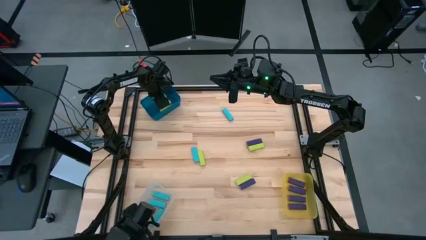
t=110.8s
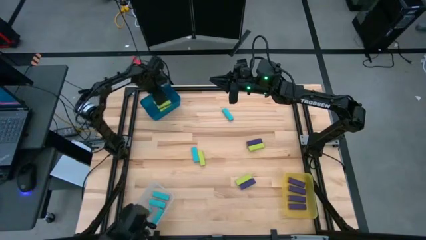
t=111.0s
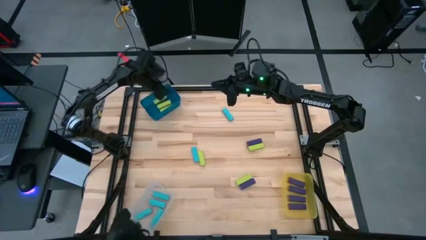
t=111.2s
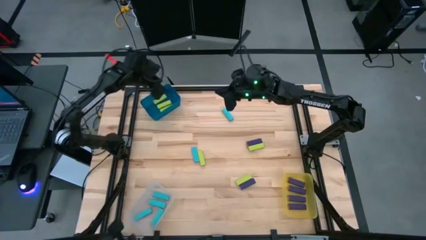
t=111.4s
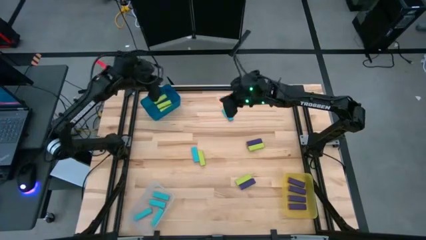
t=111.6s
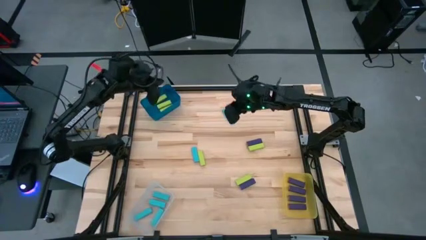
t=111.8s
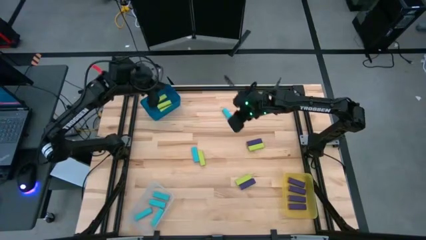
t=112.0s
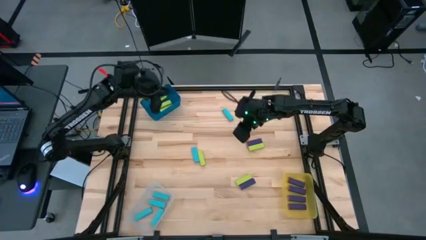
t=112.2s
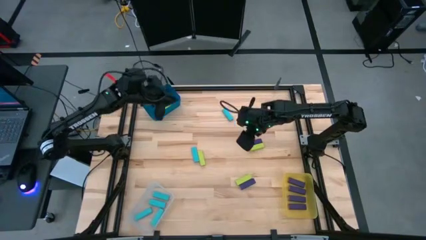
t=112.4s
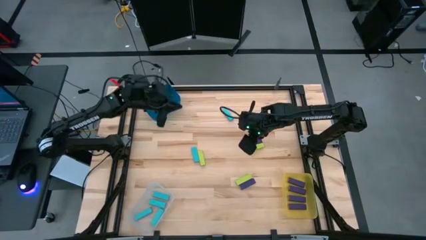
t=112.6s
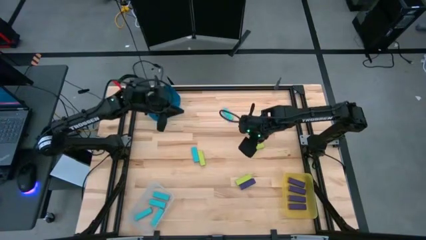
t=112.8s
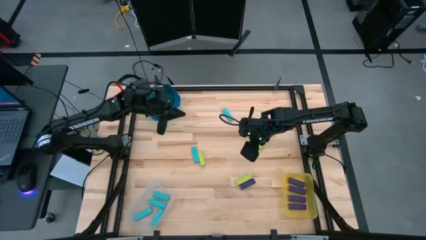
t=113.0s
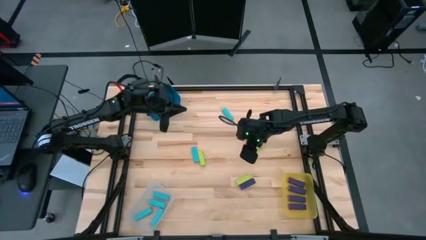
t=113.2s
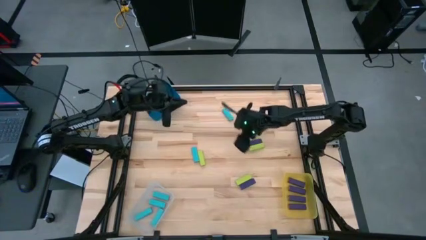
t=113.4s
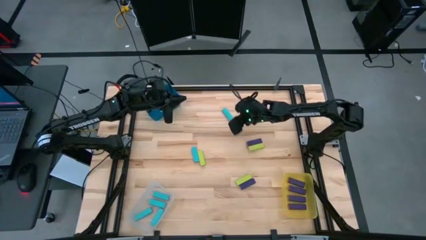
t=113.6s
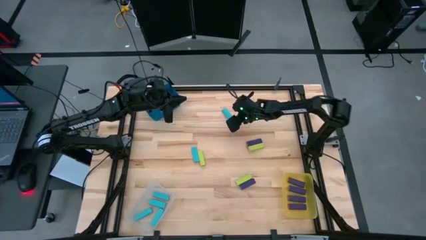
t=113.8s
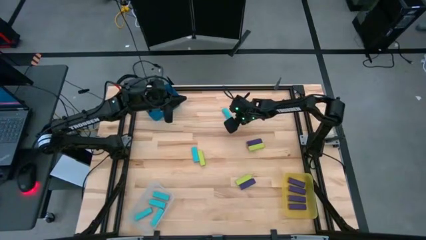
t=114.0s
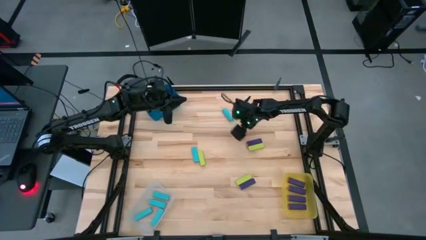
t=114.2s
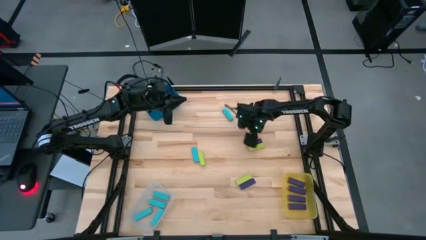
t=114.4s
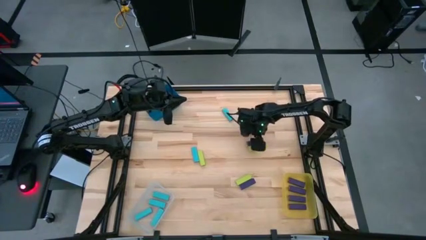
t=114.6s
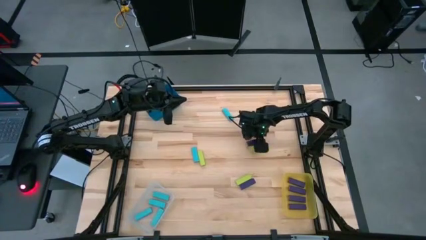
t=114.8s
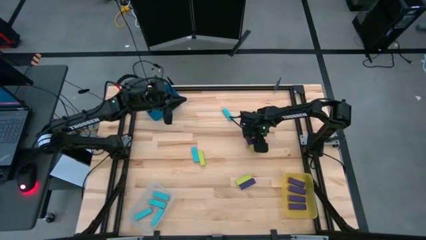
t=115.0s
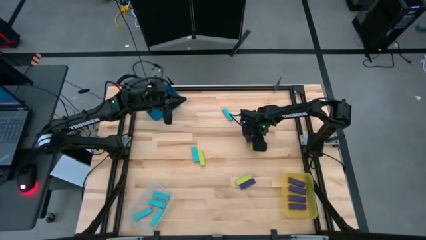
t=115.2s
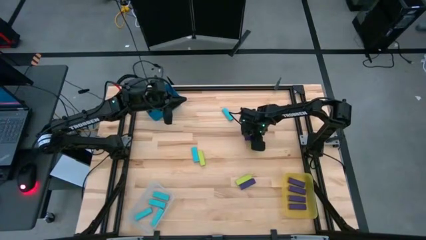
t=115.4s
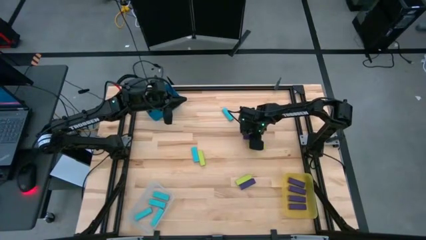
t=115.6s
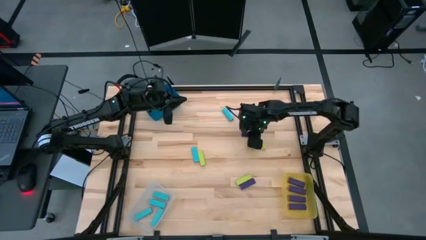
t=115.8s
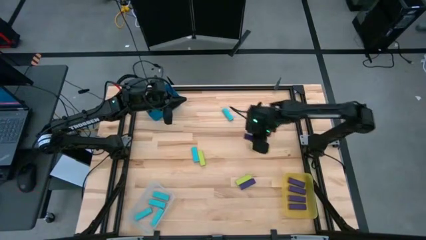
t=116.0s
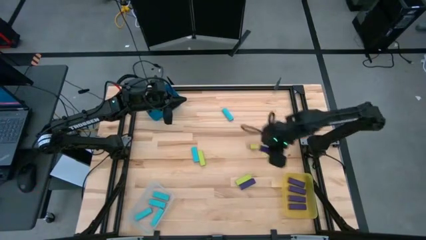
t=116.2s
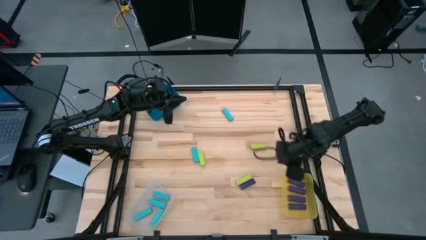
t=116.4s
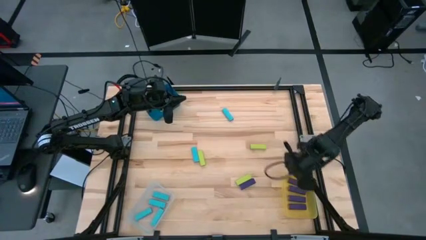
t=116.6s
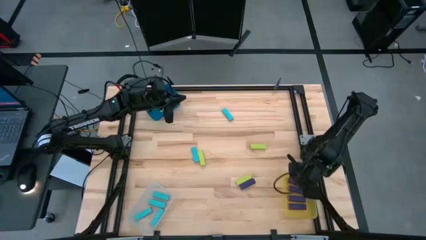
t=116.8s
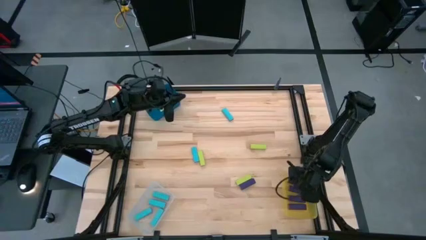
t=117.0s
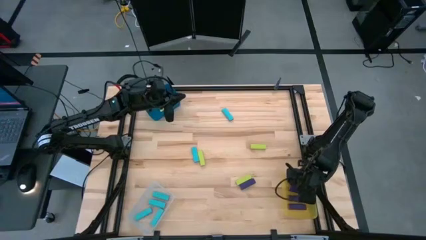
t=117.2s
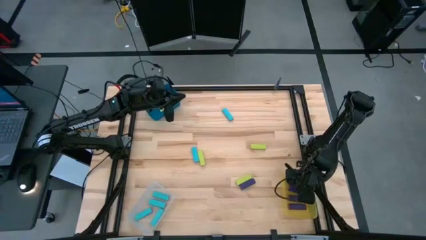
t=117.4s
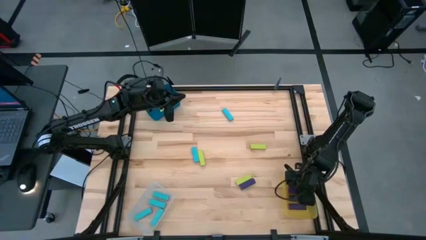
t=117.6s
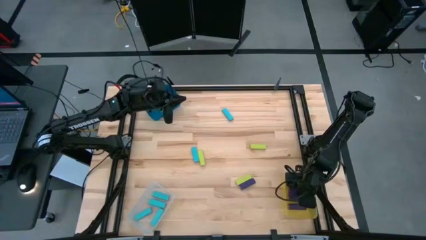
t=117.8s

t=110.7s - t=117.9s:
Task: Sort blocks
Put the violet block into the yellow bin

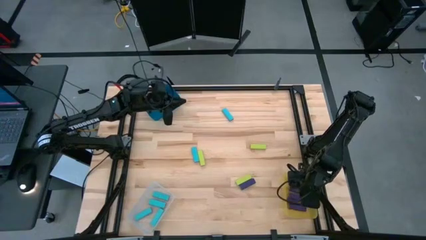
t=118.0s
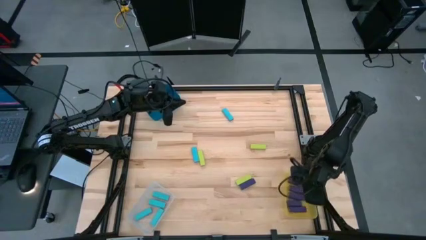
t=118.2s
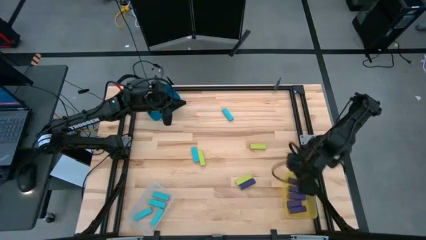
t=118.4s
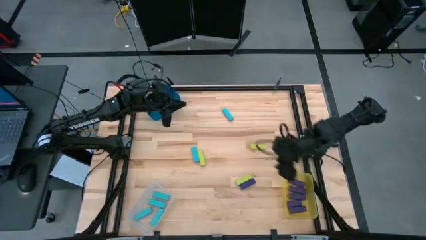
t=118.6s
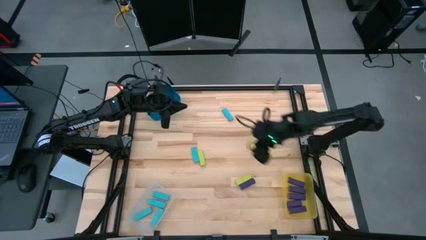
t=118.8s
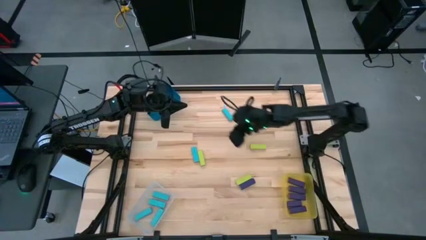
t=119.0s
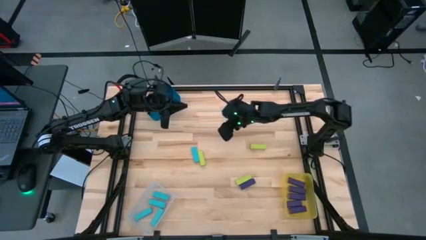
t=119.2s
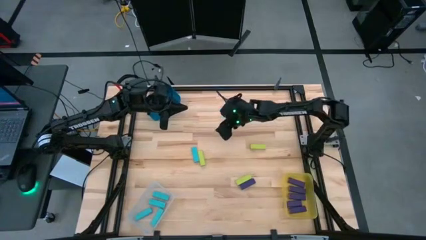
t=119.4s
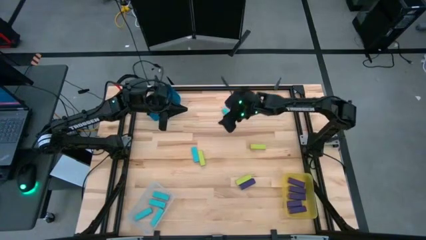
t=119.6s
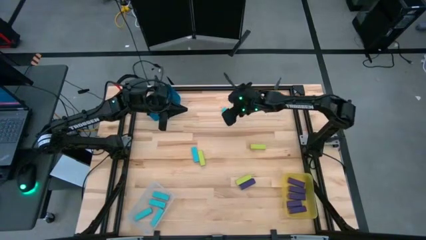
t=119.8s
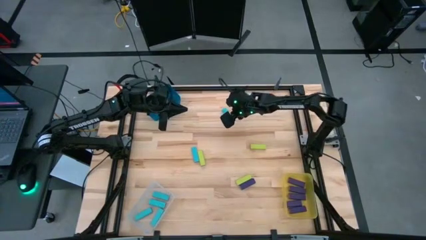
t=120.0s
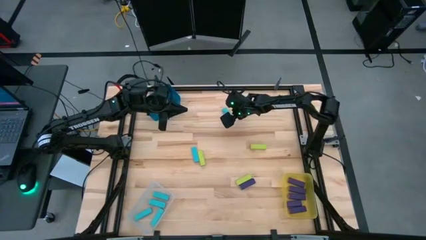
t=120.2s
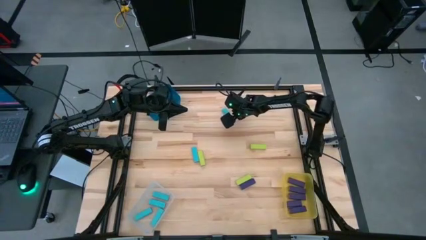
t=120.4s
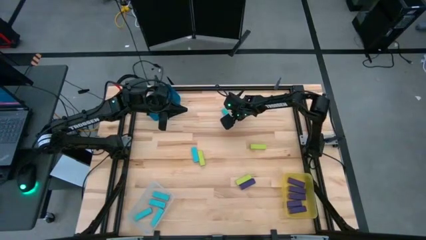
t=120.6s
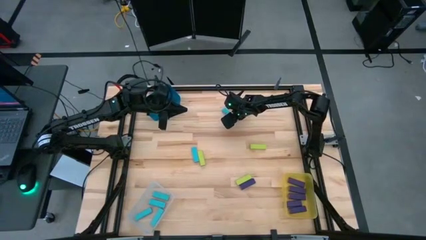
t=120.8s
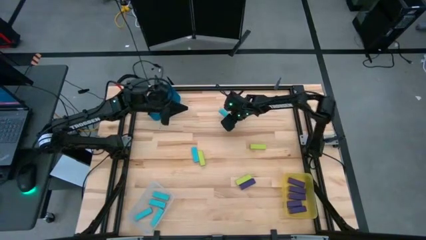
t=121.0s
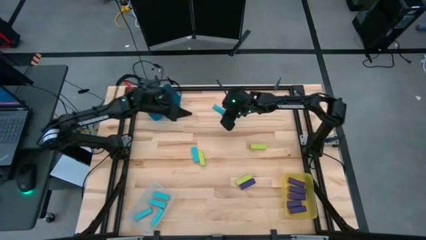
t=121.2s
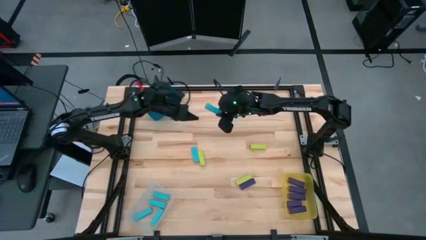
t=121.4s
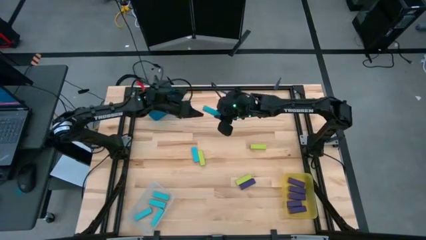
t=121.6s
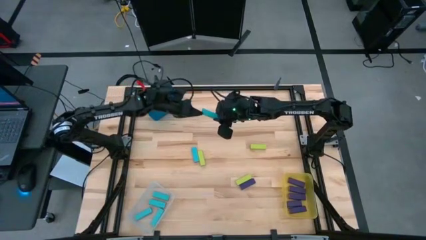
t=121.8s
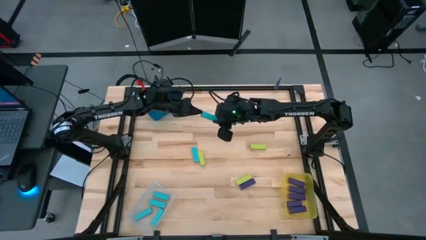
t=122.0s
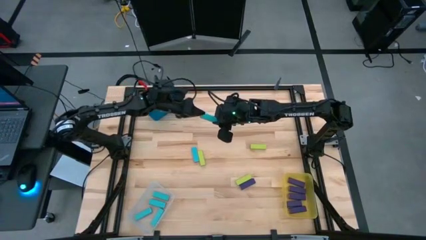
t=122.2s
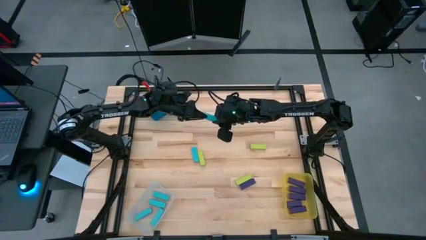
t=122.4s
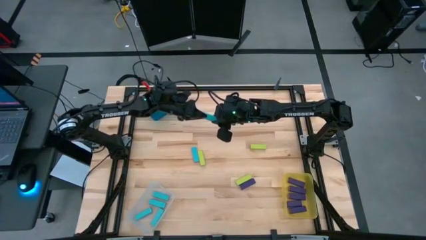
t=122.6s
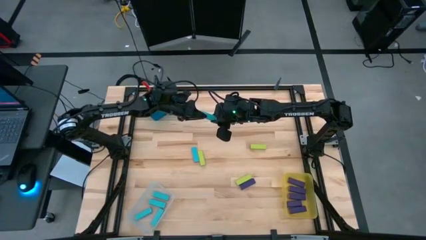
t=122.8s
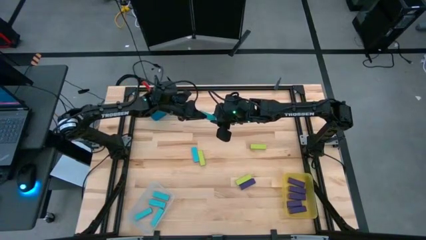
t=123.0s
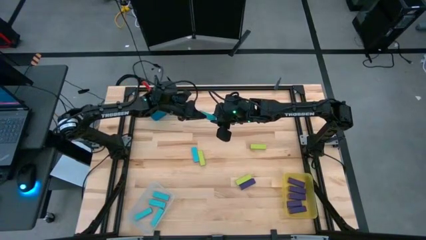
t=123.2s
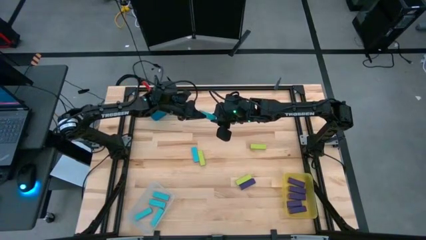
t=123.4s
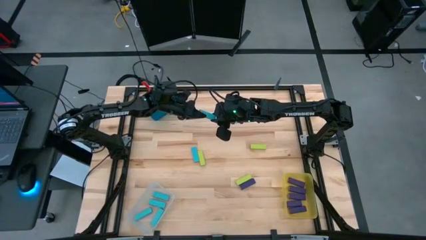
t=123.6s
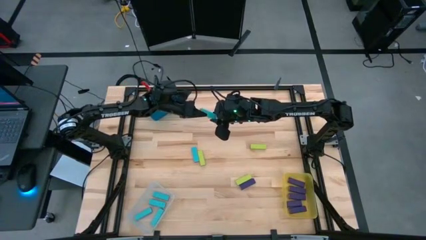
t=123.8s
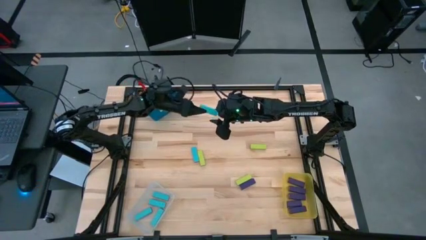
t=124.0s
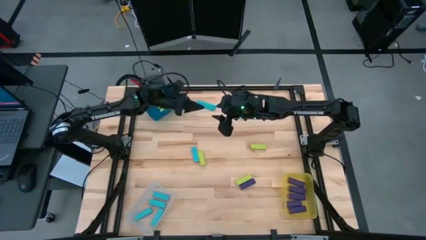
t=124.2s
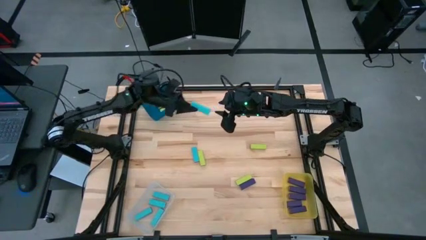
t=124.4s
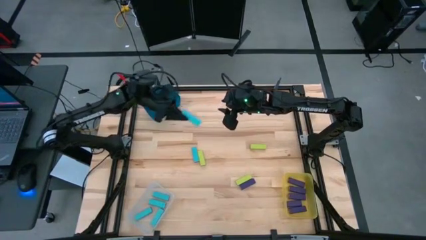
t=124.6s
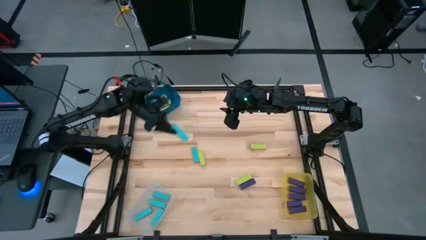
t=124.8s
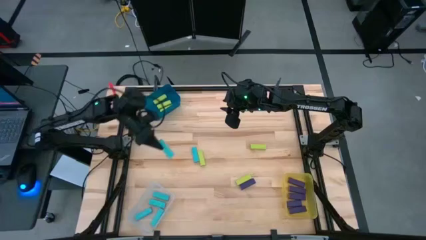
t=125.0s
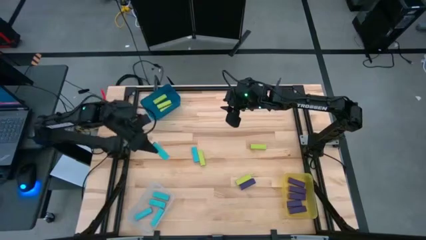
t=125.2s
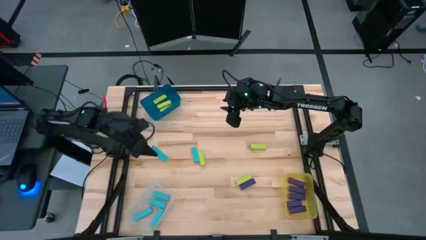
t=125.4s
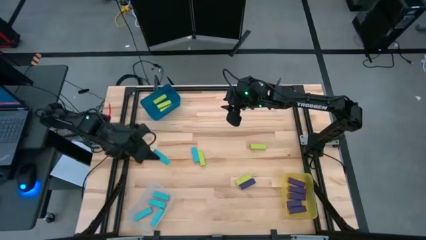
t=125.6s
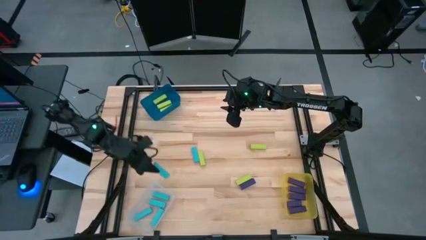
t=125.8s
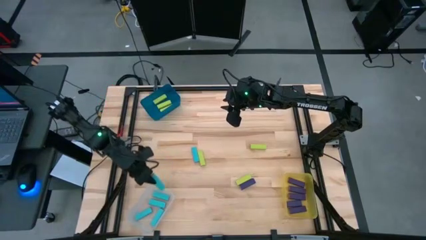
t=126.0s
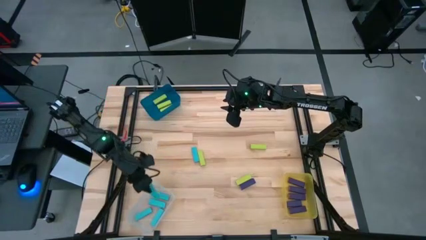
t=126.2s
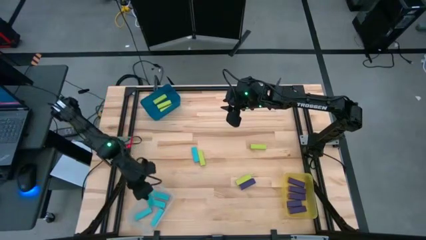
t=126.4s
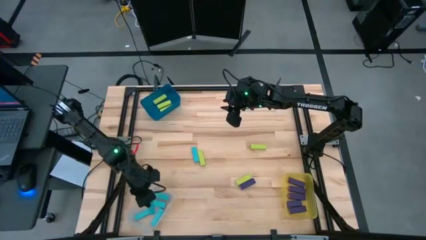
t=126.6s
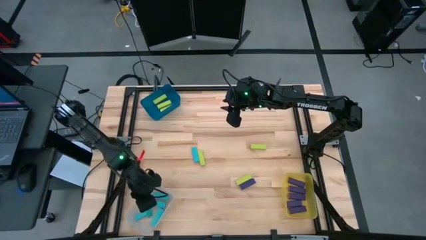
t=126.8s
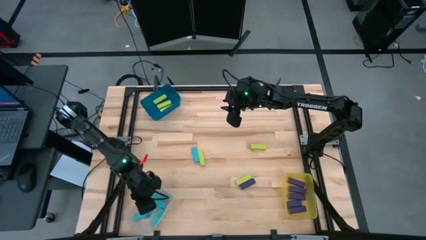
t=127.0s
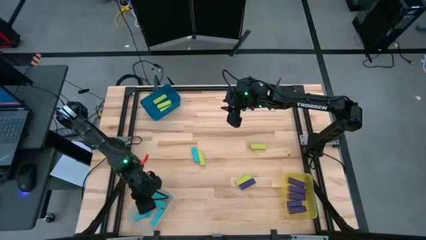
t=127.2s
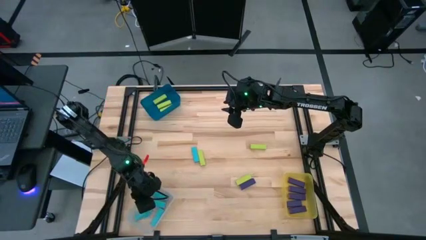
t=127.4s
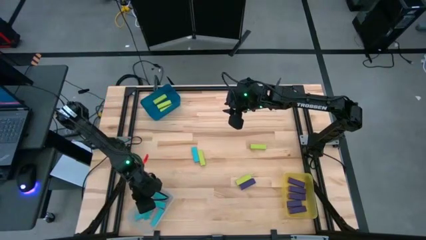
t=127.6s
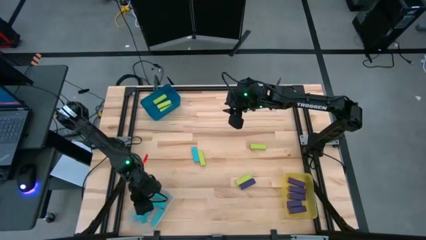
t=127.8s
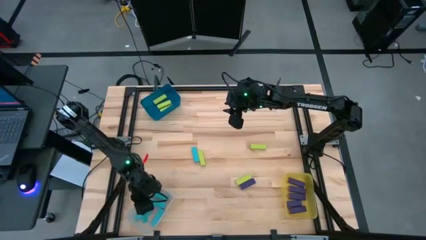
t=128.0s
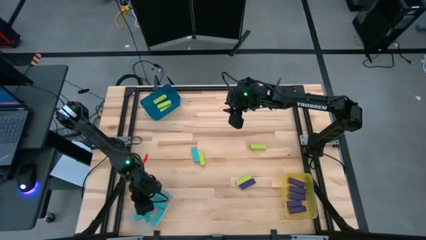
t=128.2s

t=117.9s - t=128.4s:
Put the blue block into the transparent bin
